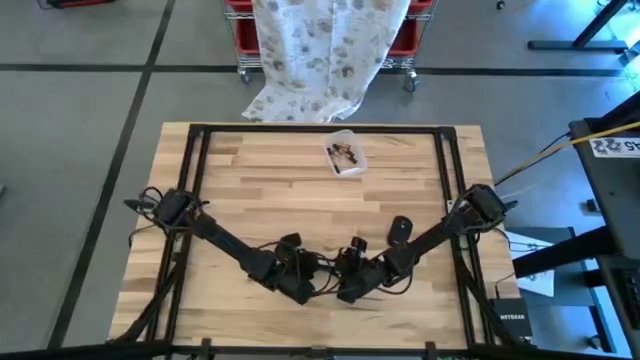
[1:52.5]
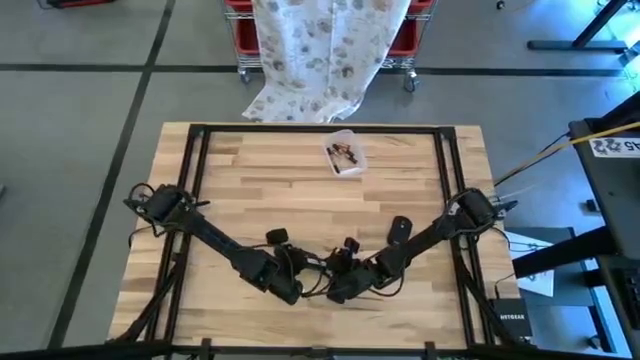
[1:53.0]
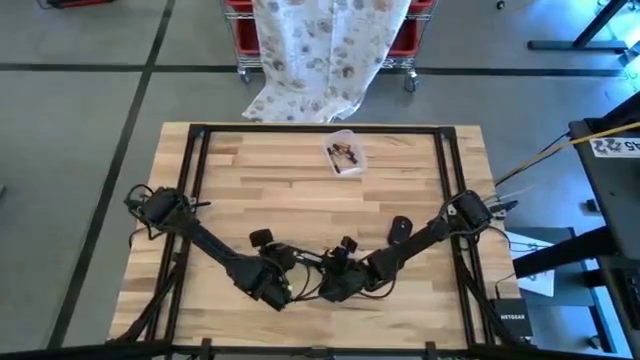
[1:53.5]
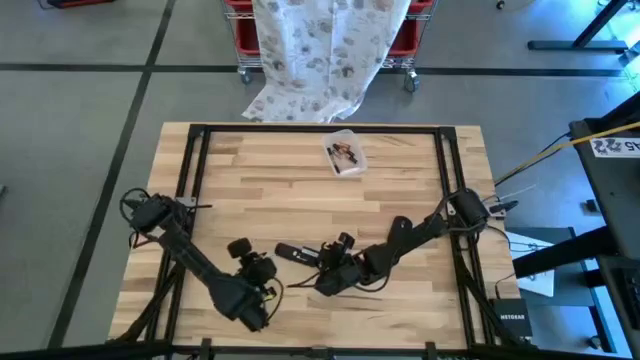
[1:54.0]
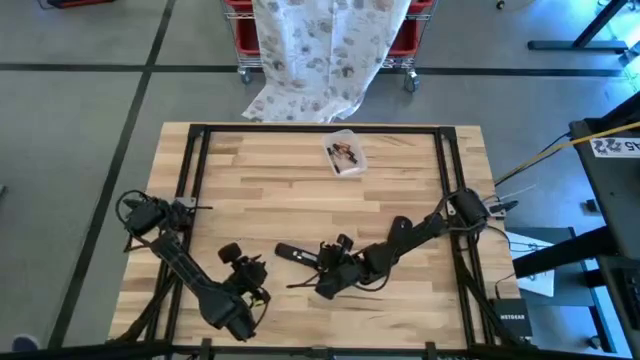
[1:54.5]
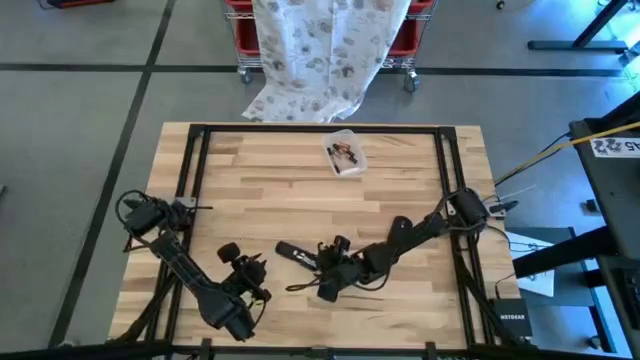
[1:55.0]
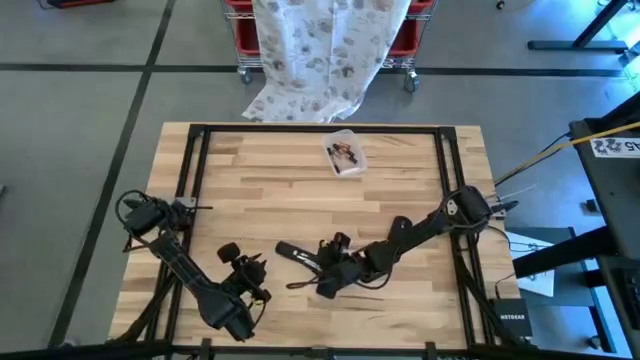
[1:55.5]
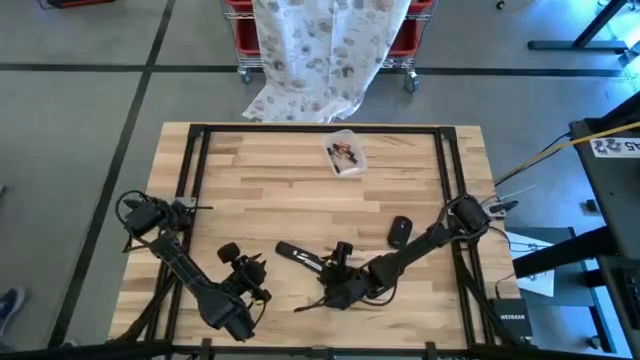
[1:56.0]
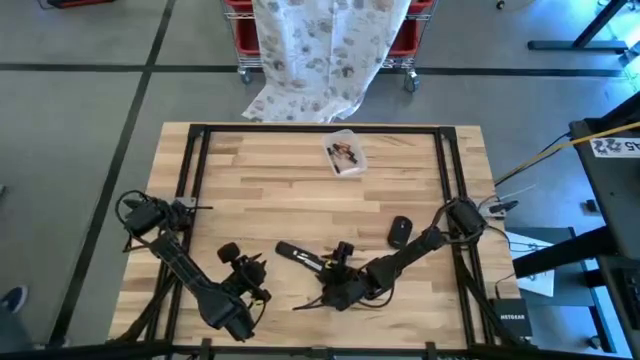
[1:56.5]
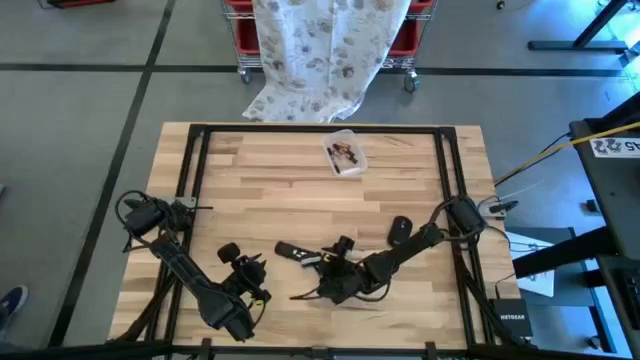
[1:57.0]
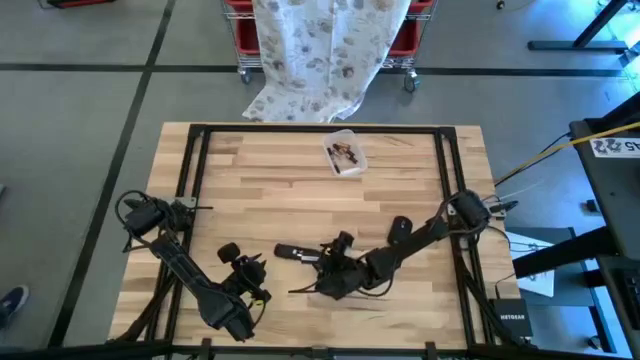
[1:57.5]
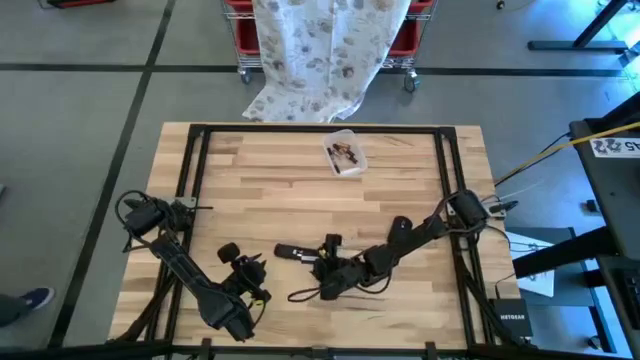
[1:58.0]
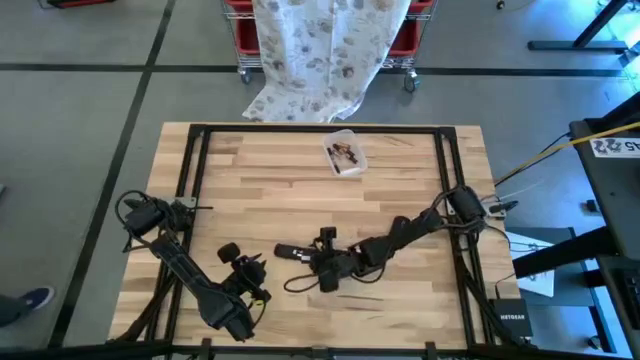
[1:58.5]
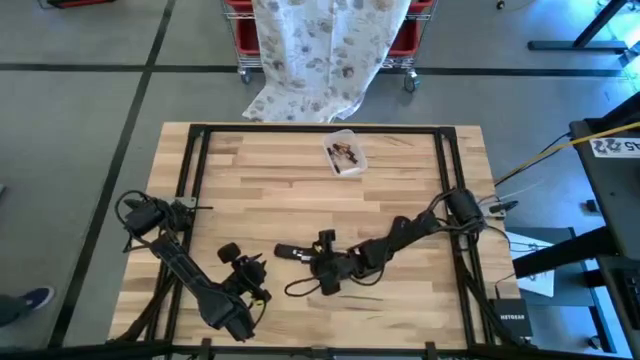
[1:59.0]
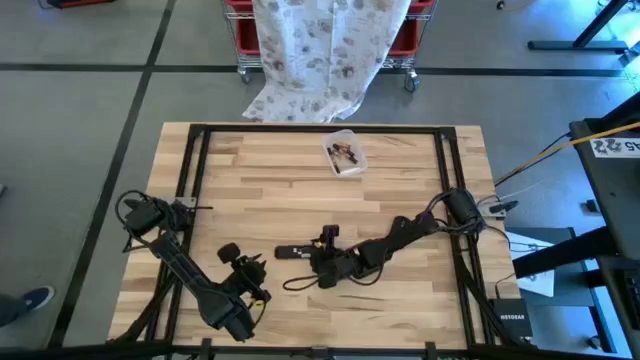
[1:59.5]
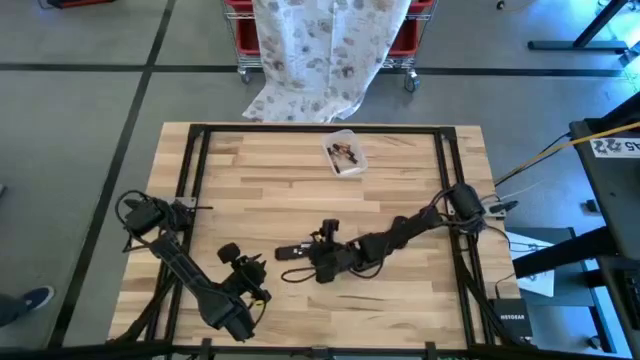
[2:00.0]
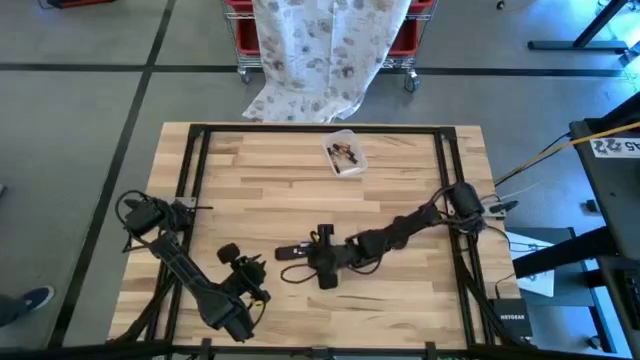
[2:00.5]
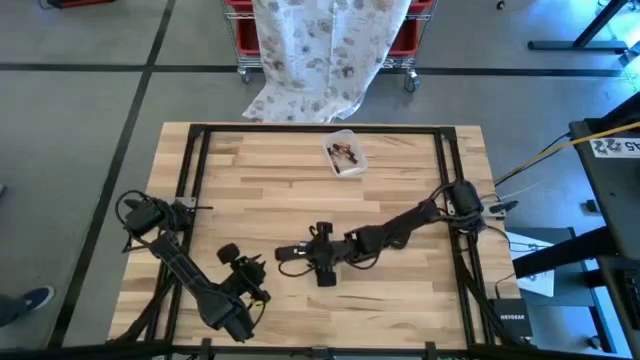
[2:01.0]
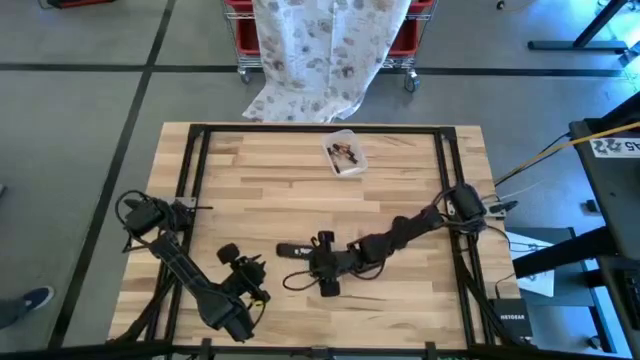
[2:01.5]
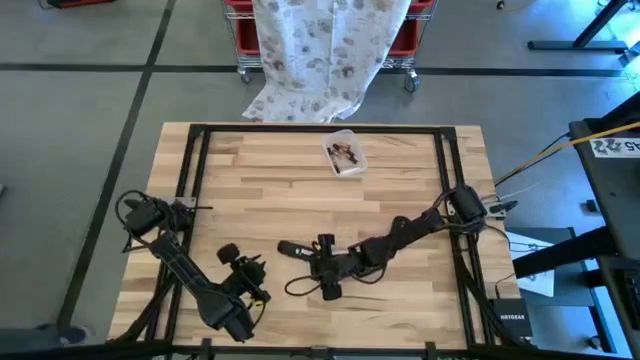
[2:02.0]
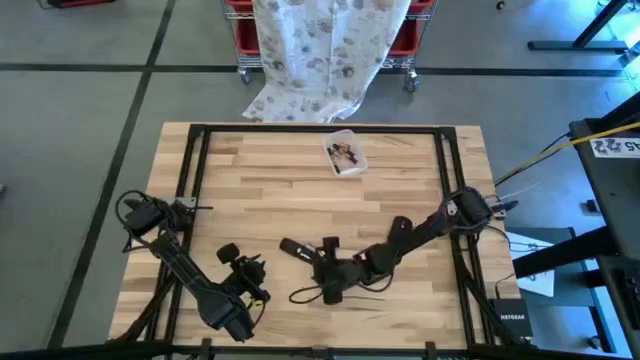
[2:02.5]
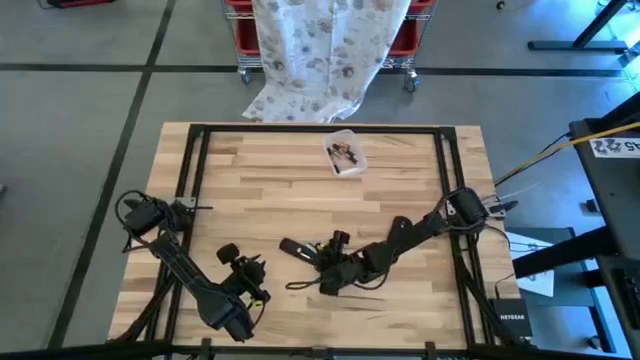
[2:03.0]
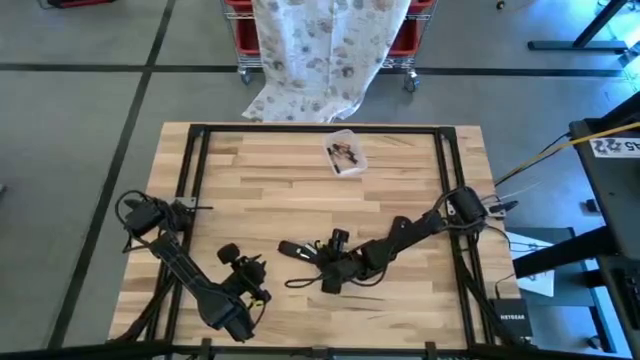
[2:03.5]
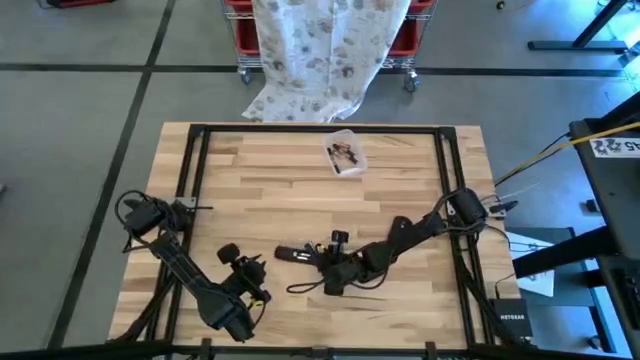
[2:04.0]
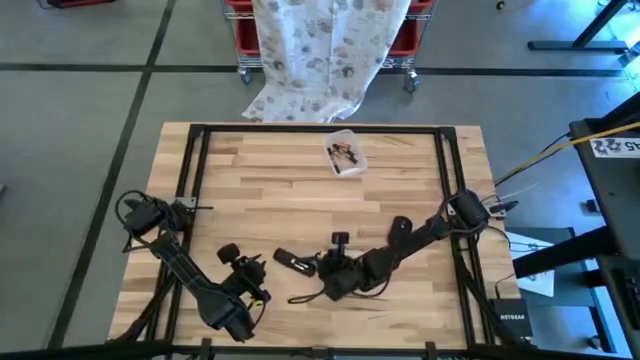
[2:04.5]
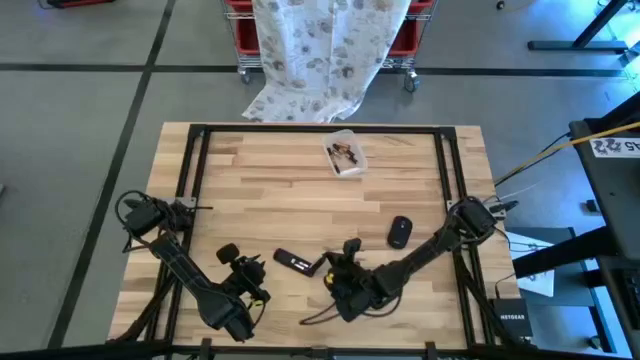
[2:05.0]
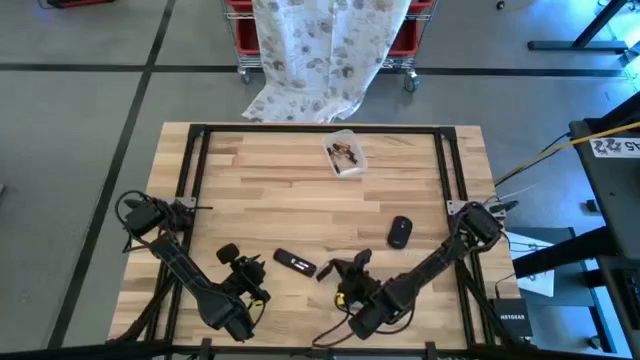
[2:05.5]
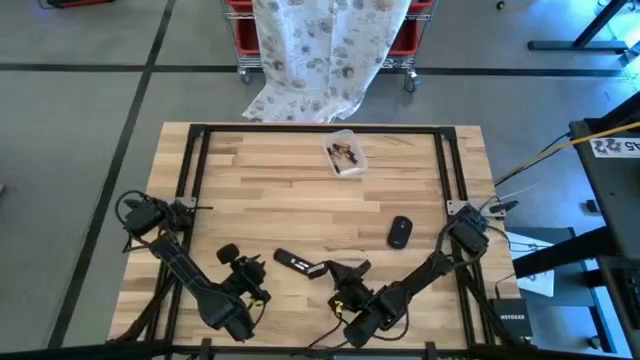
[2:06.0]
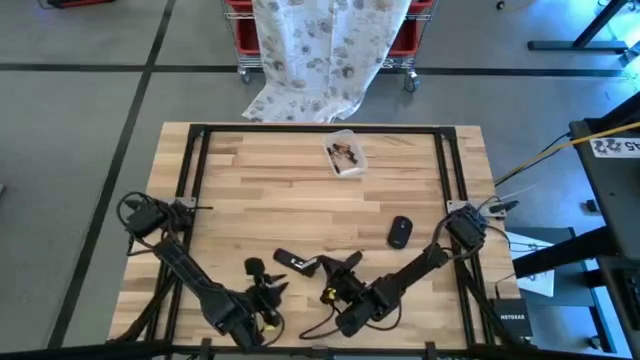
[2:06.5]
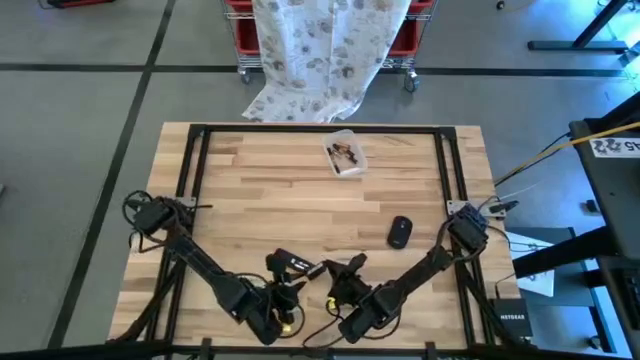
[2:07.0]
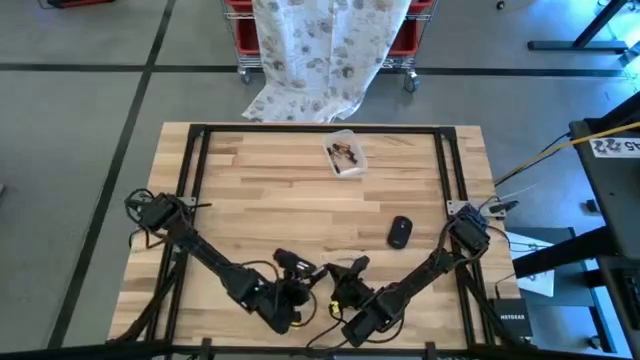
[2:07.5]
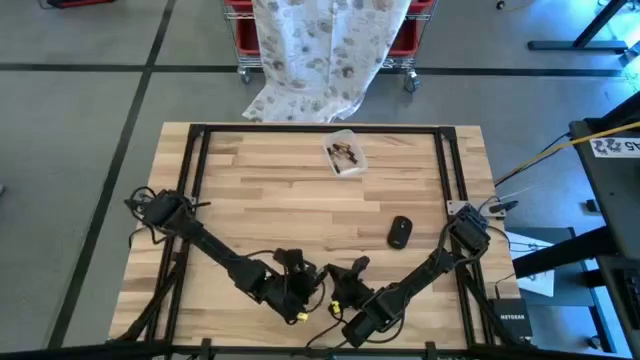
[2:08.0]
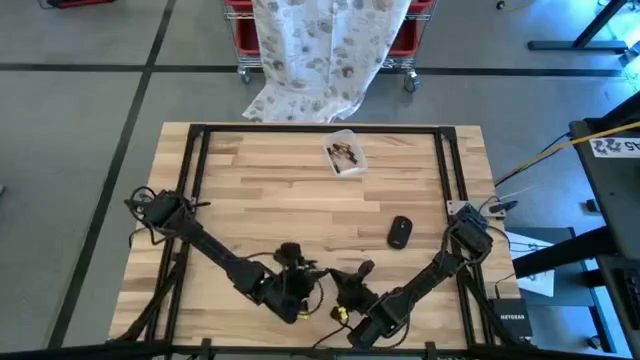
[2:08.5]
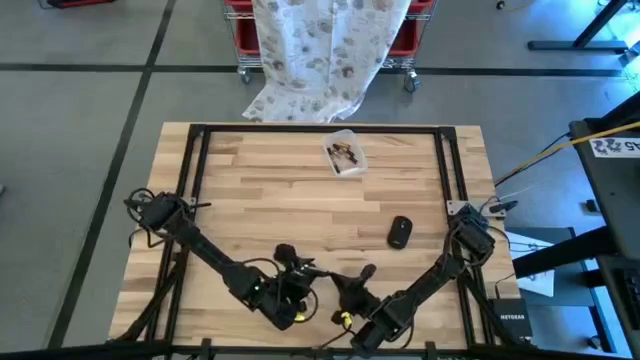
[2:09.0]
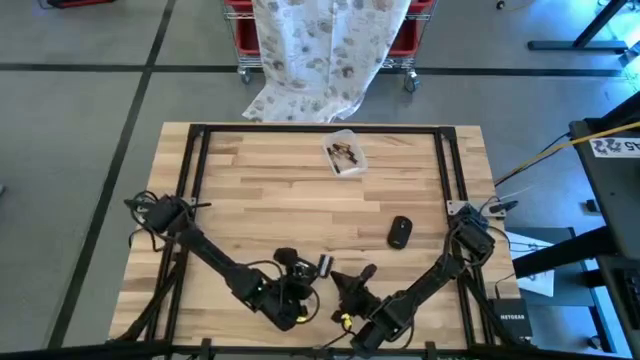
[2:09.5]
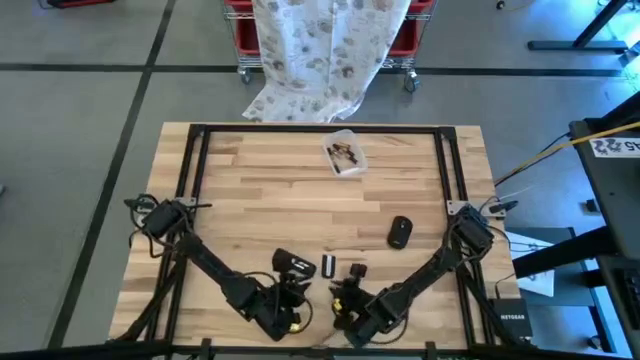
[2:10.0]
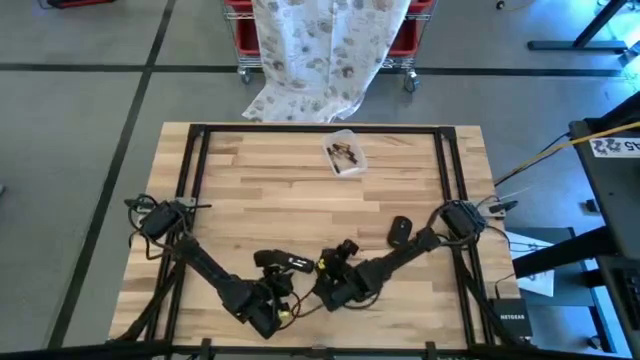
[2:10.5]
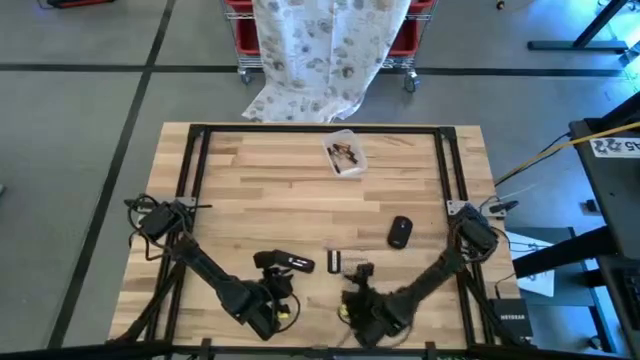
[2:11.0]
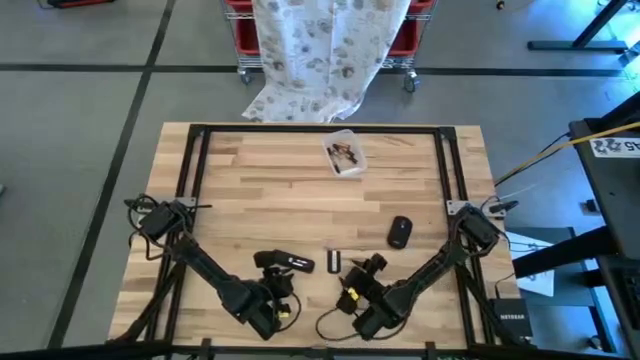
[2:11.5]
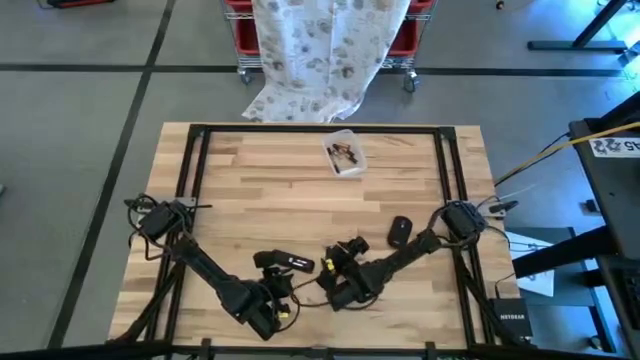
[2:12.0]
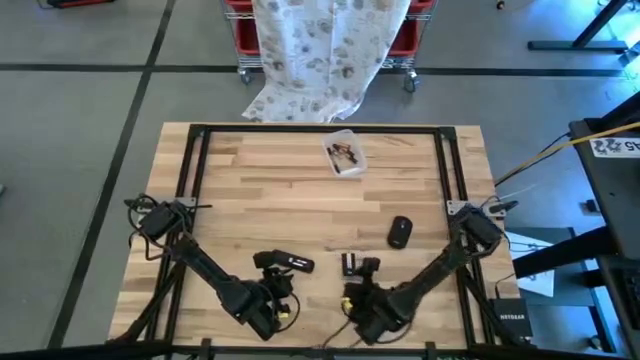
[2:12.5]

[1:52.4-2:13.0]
Task: Insert battery
Close the remote control cover
